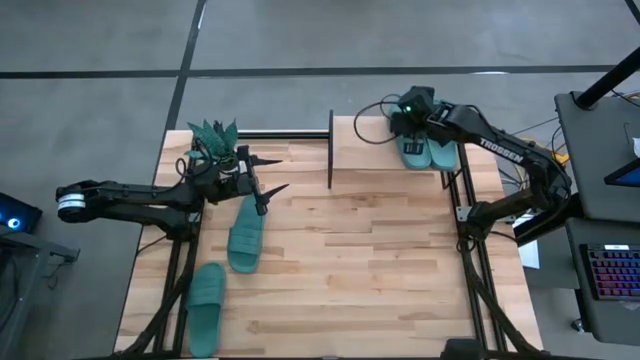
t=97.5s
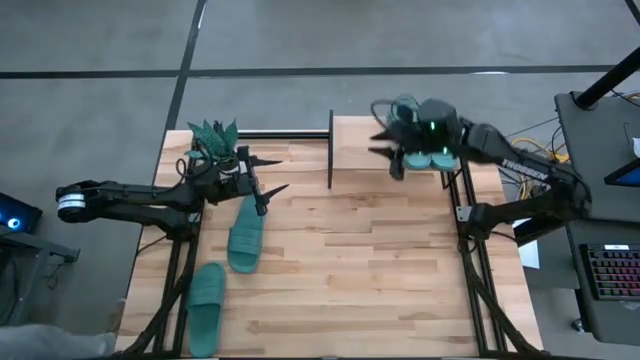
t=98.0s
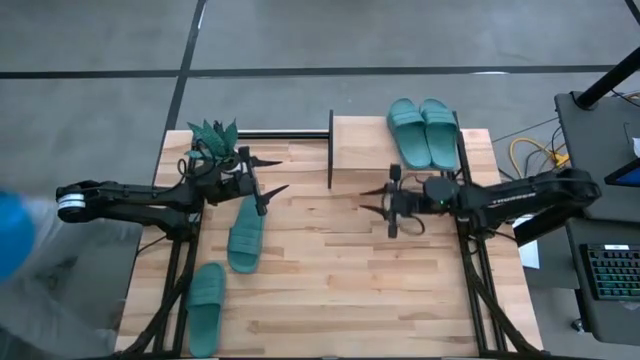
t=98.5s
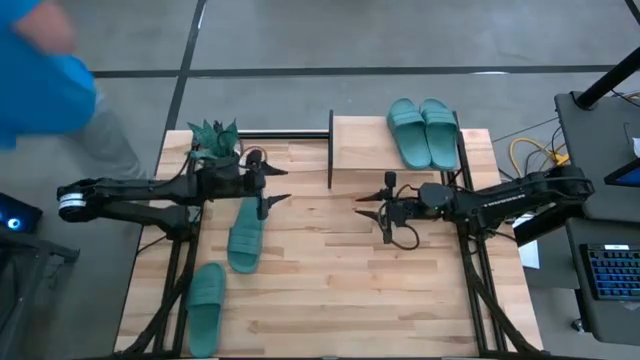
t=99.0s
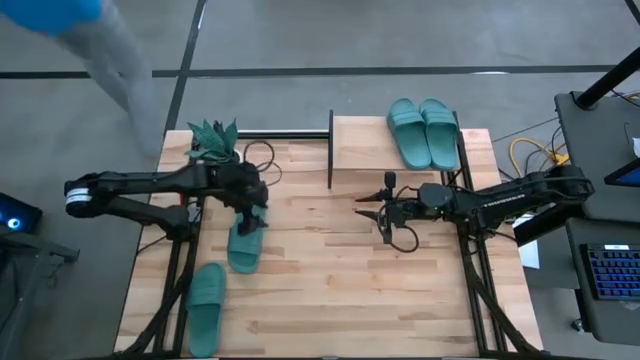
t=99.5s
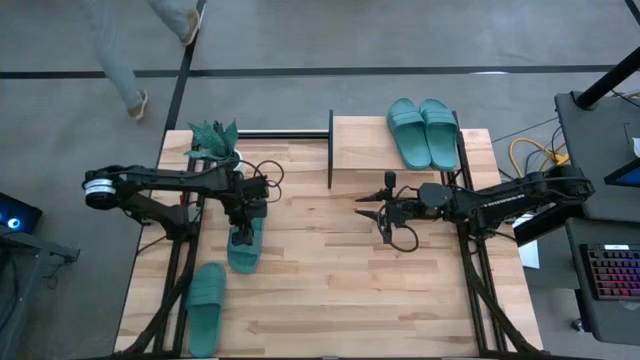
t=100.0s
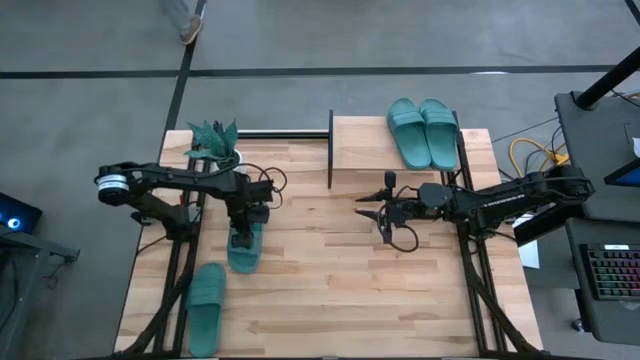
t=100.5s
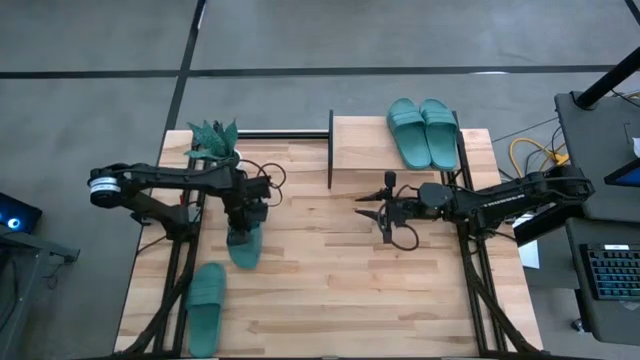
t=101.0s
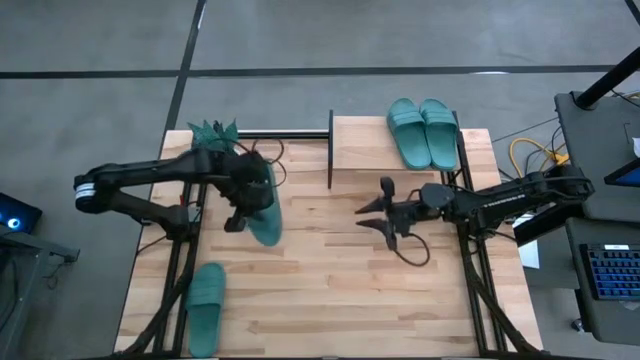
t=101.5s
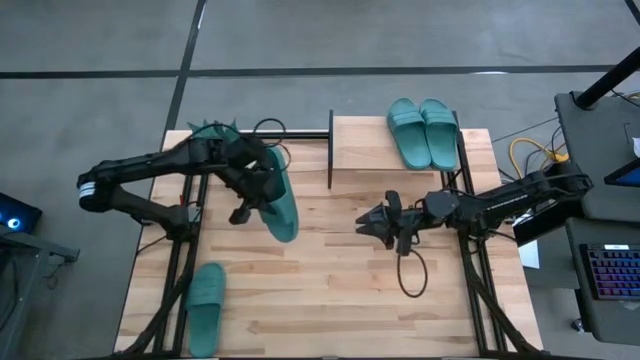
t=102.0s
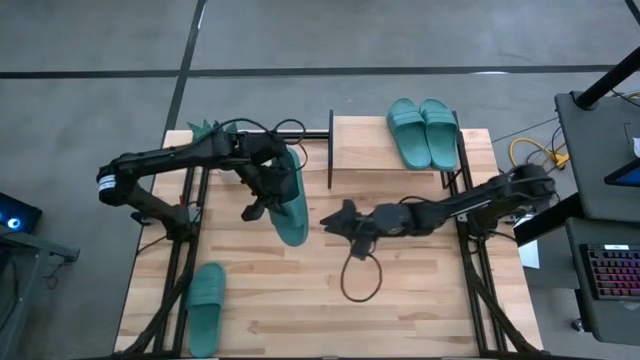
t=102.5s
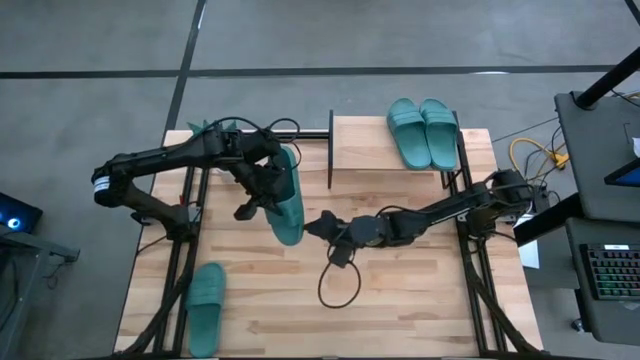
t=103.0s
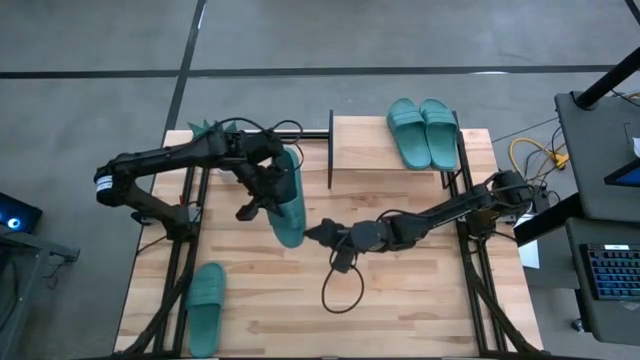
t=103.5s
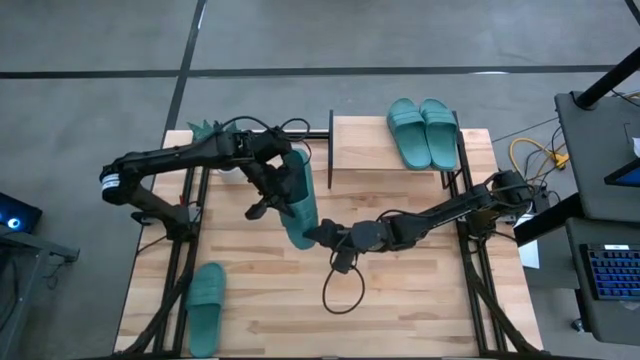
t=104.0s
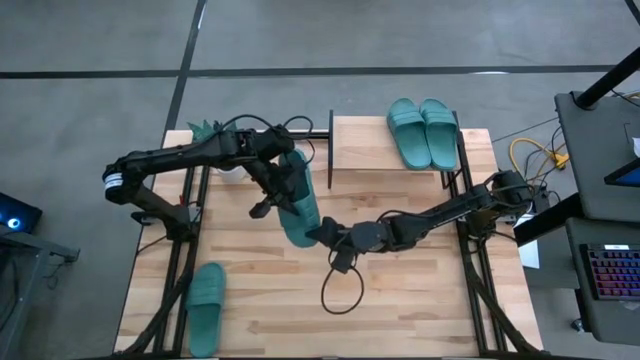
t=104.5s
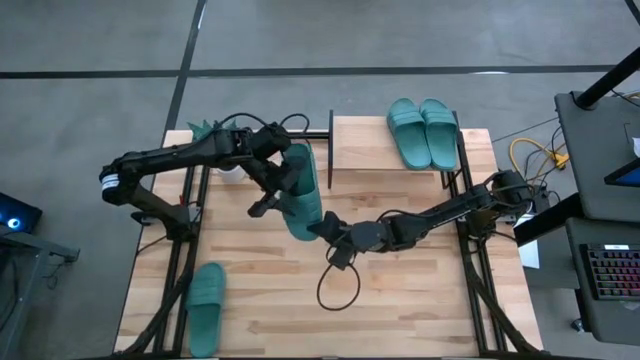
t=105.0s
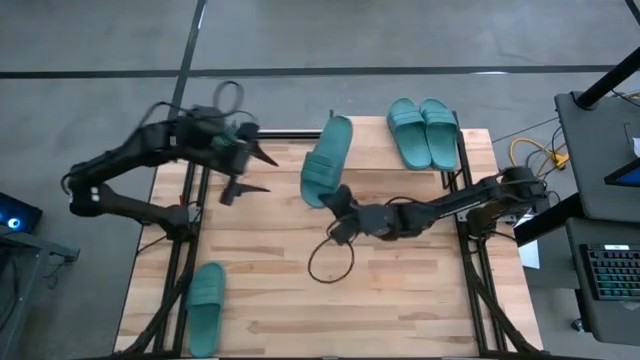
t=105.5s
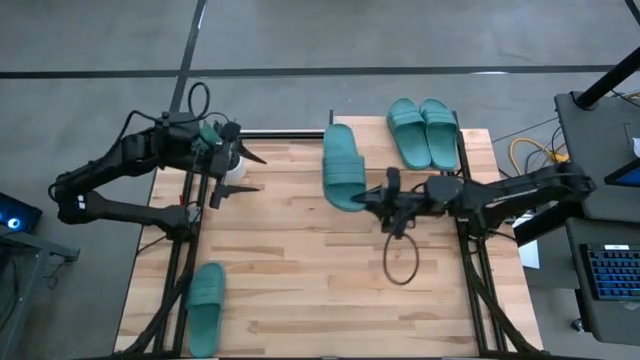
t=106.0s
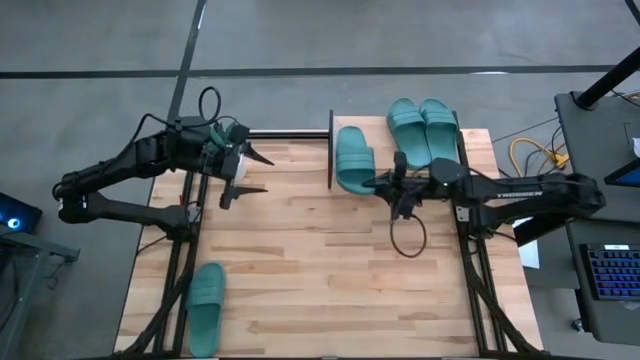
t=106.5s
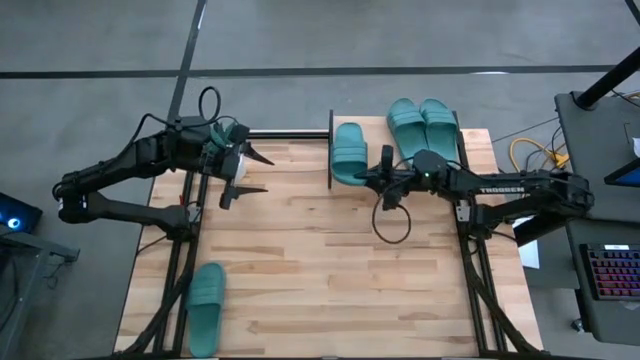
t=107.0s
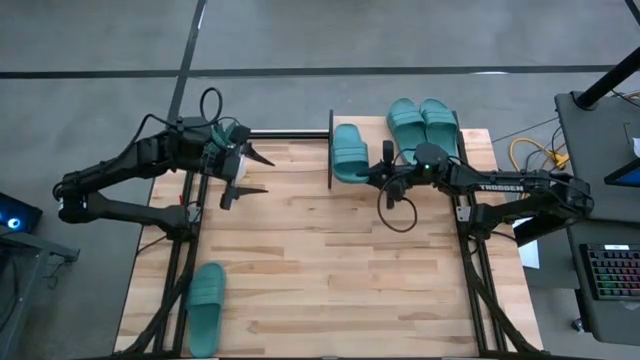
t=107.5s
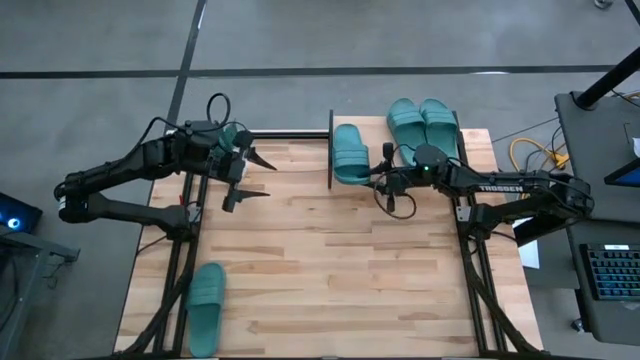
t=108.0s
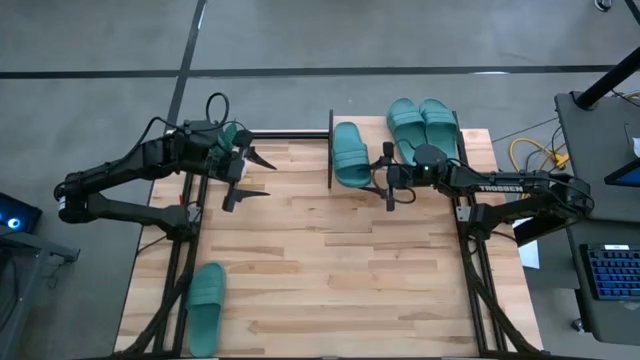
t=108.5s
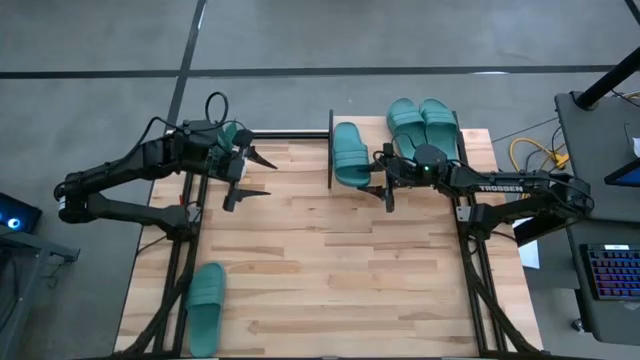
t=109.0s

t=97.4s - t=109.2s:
Task: Pick and place slides into the shelf
Put the top green slipper on the shelf

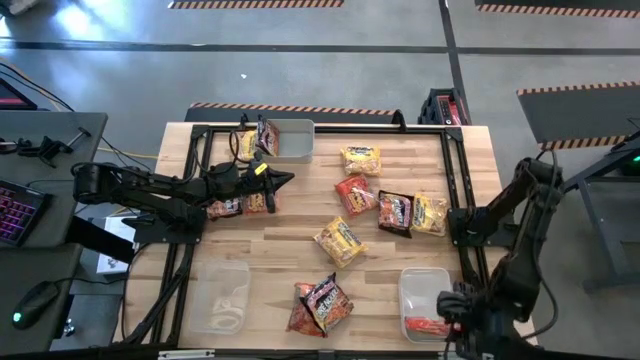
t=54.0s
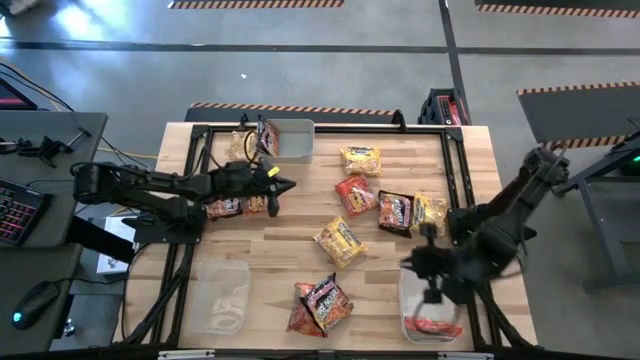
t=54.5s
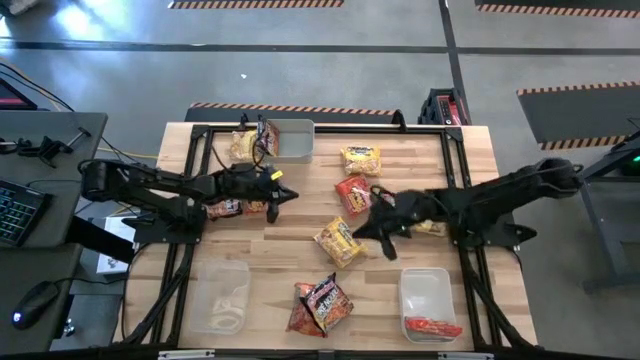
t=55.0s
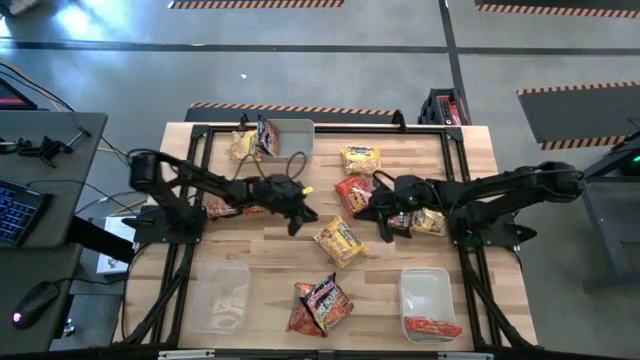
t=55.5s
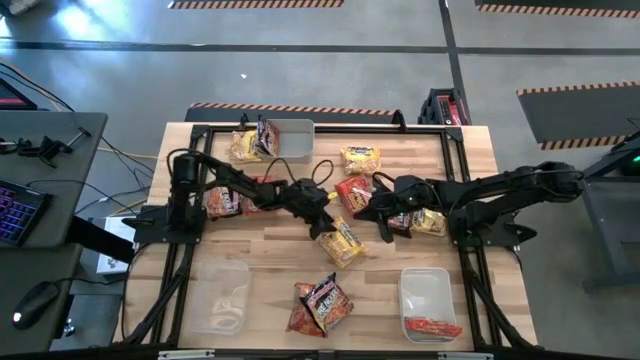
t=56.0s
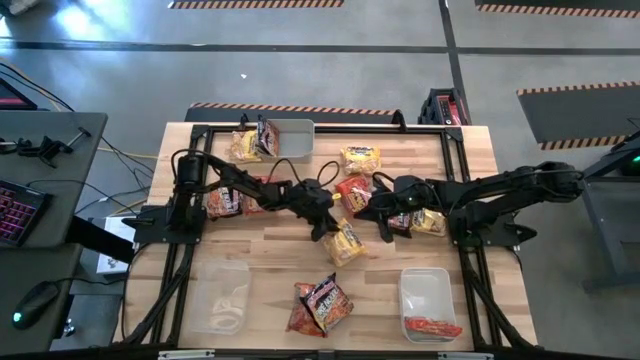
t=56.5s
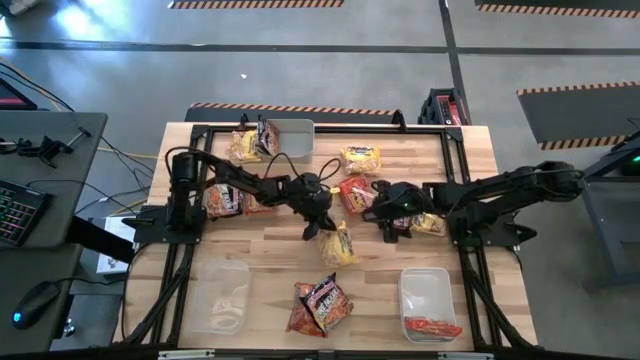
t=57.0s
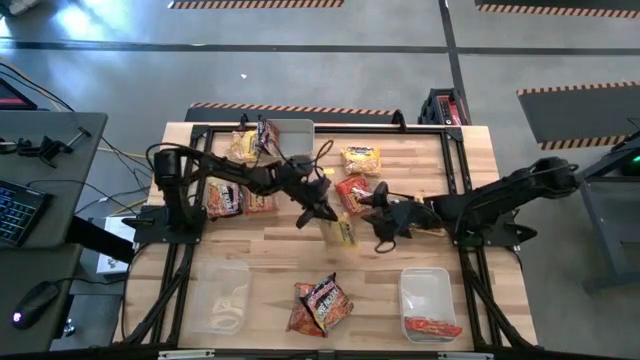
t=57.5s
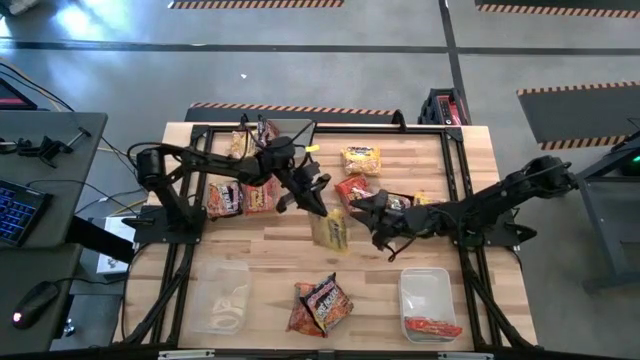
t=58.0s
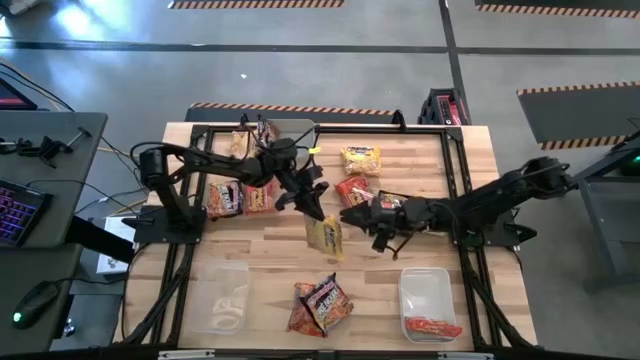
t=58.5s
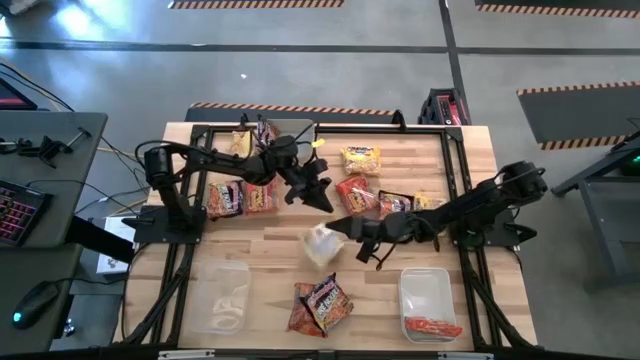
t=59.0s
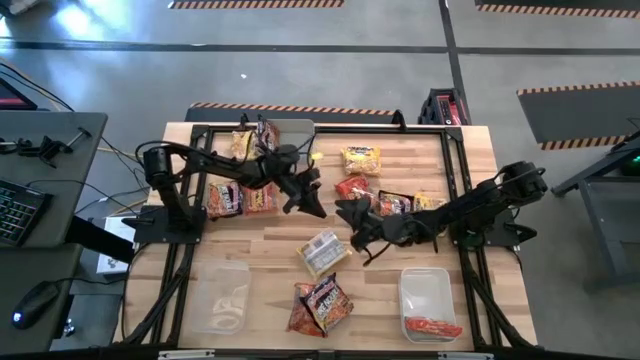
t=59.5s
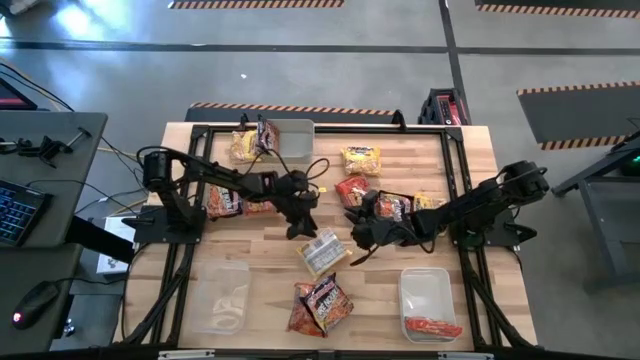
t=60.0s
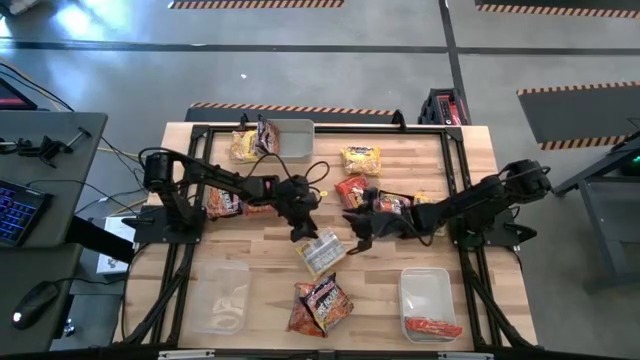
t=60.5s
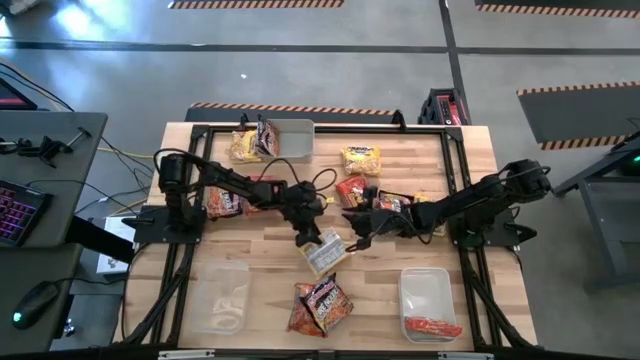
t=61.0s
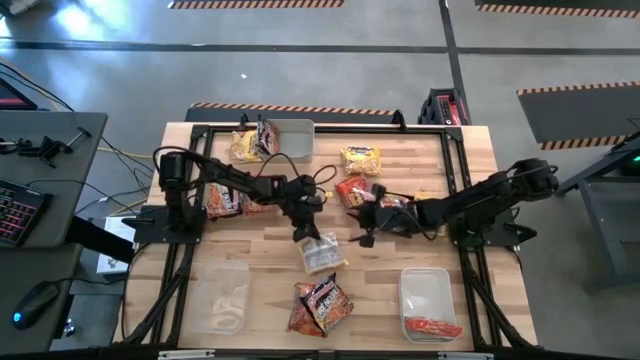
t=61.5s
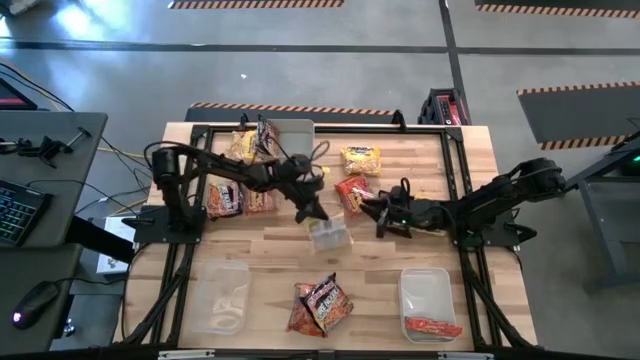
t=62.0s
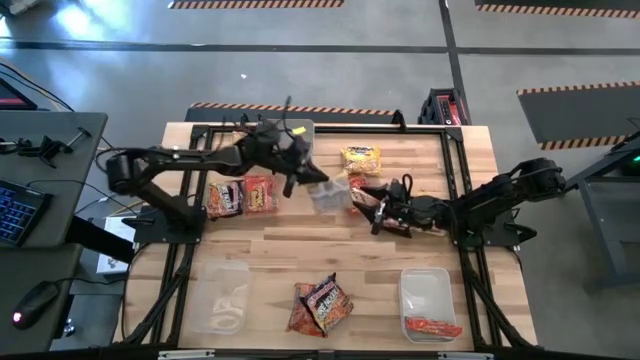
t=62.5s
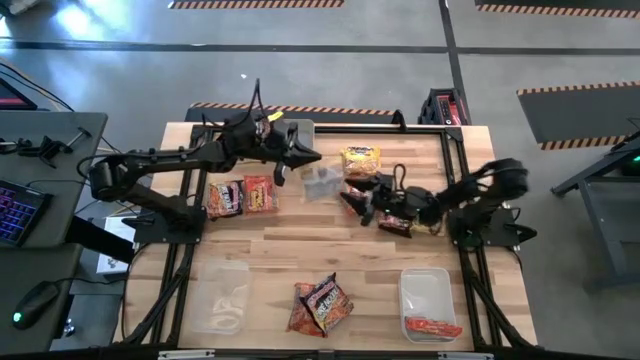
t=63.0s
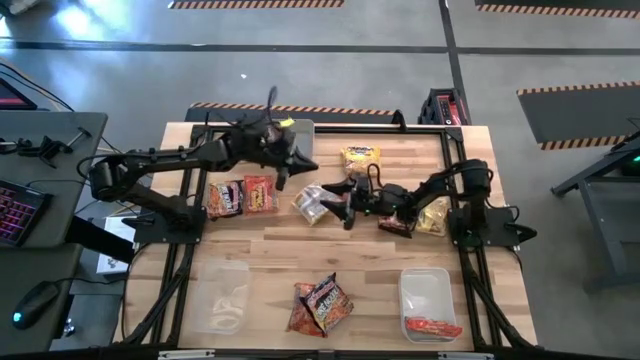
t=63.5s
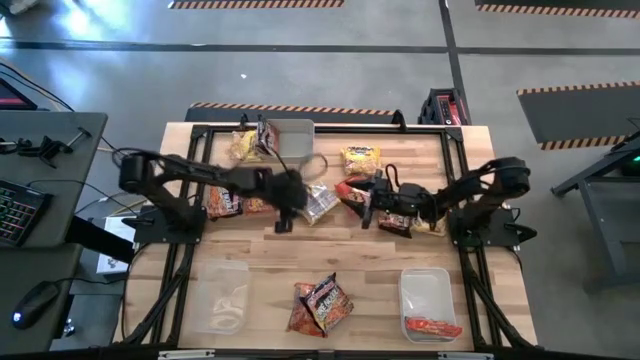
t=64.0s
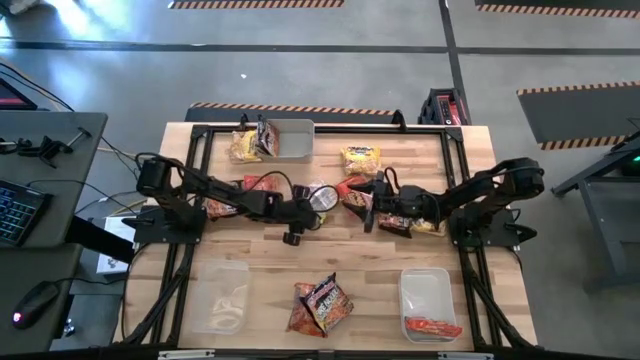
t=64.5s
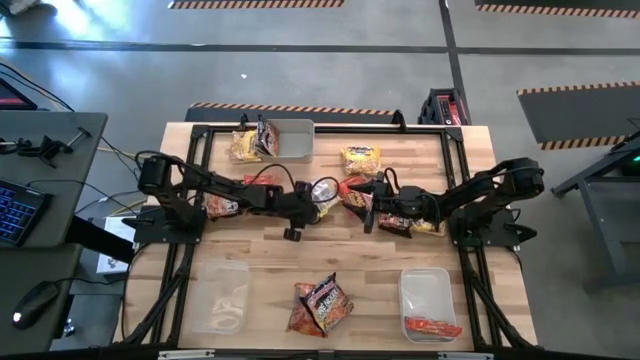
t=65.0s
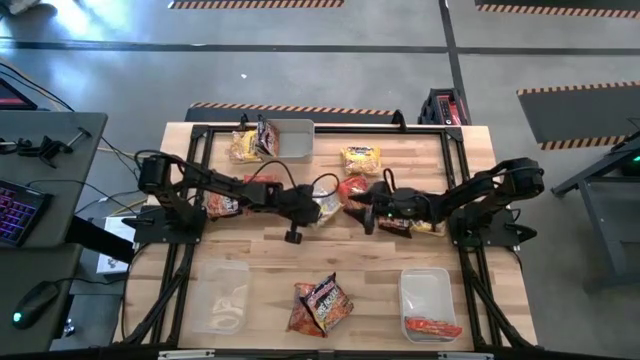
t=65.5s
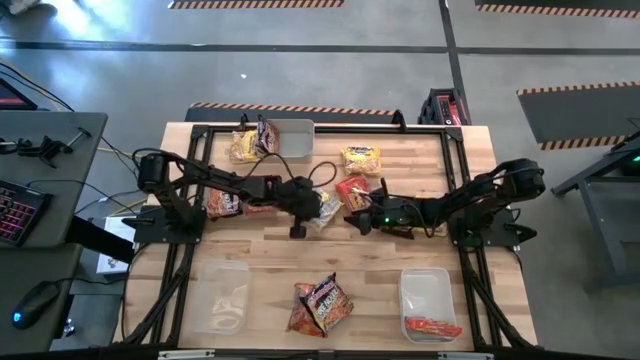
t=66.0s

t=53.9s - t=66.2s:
Task: Sort Maruchan noodles
Put the bottom left yellow noodle pack into the transparent bin
